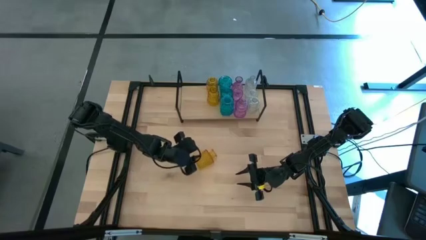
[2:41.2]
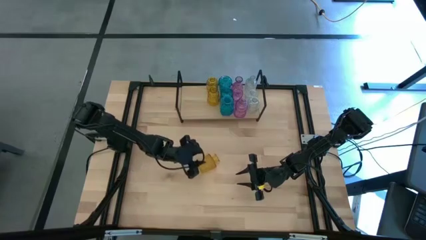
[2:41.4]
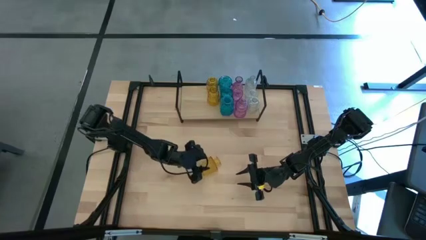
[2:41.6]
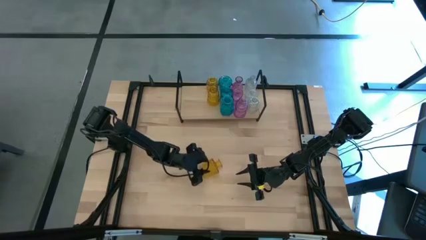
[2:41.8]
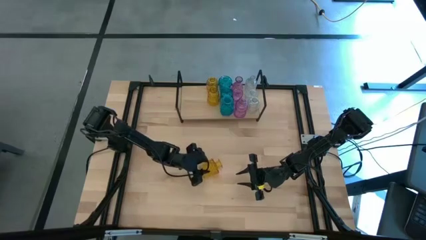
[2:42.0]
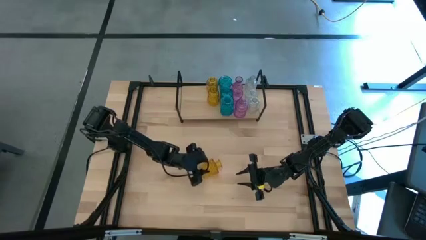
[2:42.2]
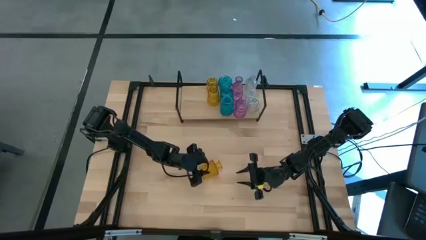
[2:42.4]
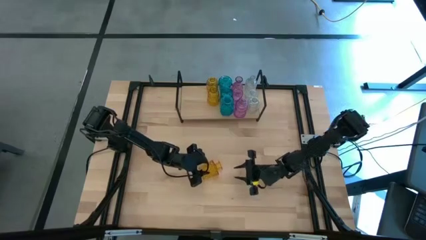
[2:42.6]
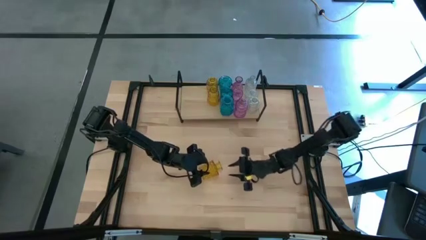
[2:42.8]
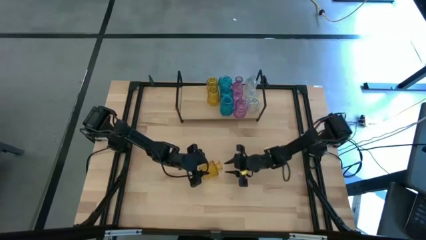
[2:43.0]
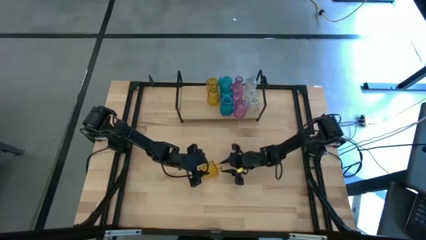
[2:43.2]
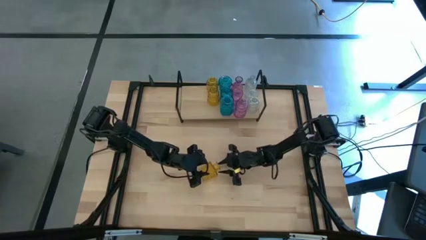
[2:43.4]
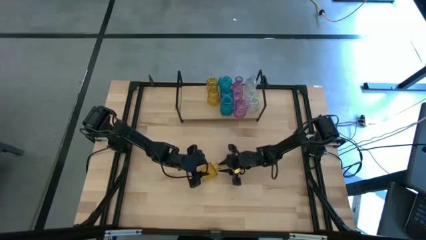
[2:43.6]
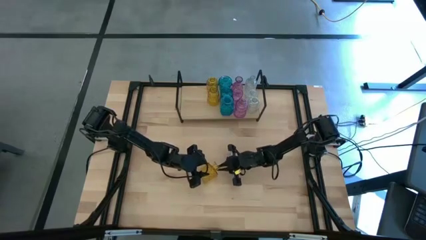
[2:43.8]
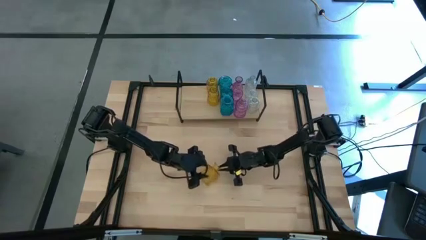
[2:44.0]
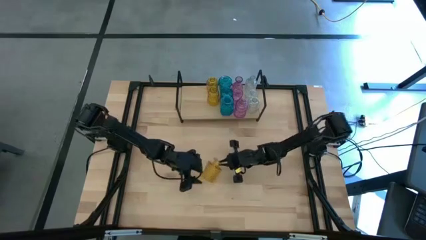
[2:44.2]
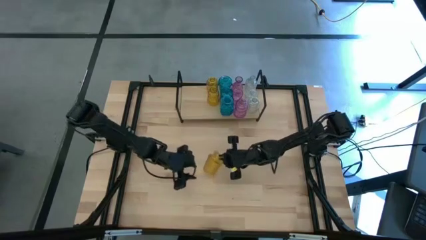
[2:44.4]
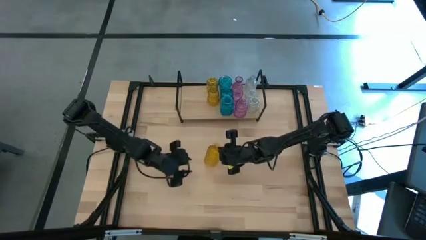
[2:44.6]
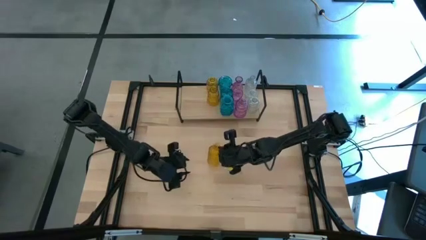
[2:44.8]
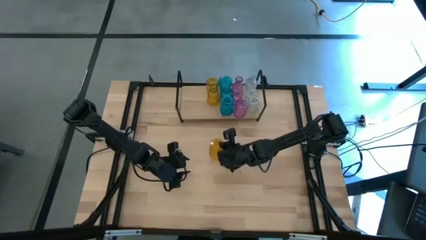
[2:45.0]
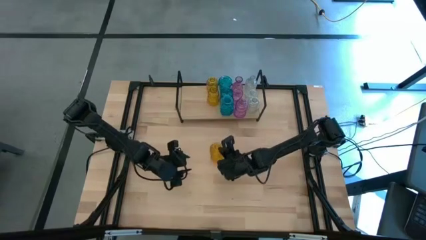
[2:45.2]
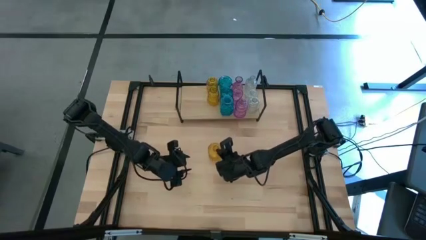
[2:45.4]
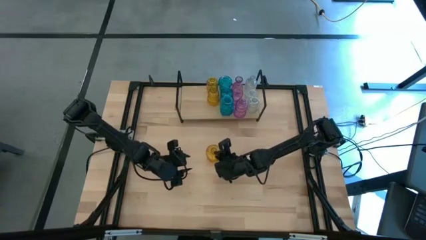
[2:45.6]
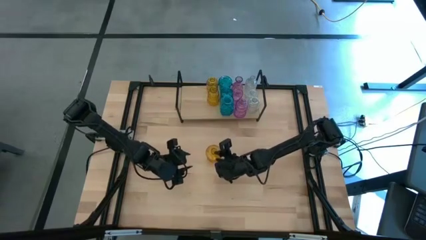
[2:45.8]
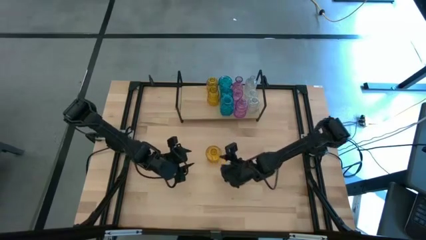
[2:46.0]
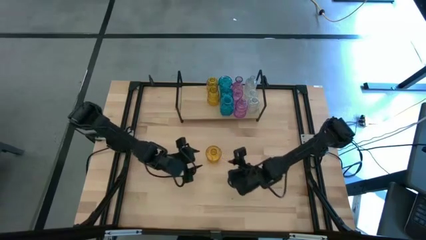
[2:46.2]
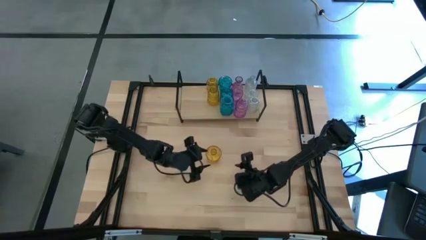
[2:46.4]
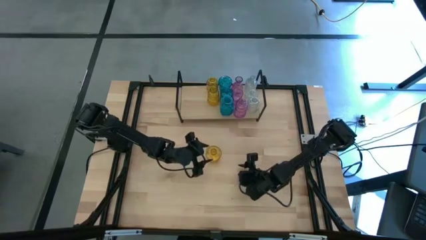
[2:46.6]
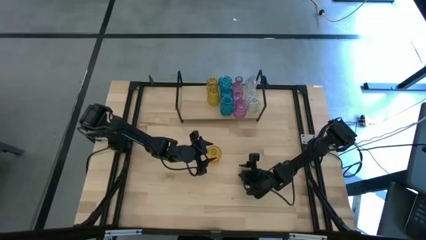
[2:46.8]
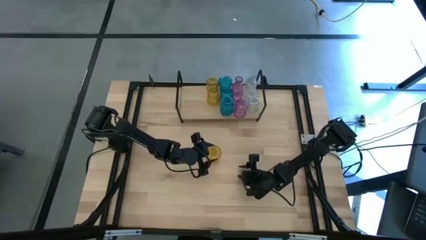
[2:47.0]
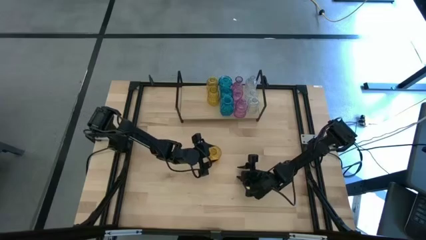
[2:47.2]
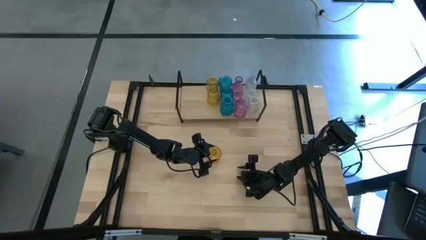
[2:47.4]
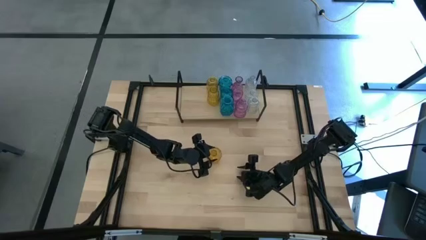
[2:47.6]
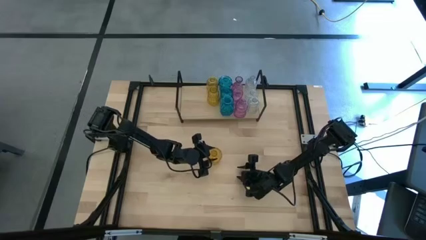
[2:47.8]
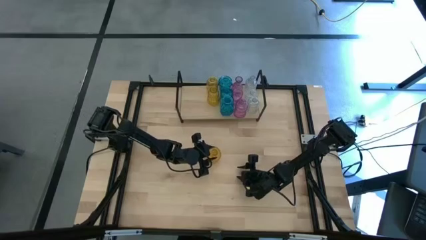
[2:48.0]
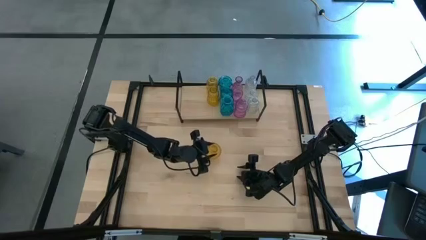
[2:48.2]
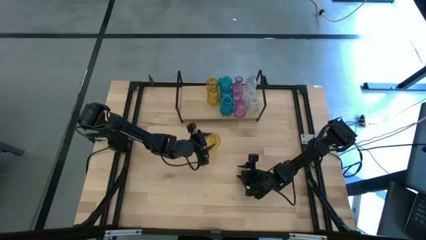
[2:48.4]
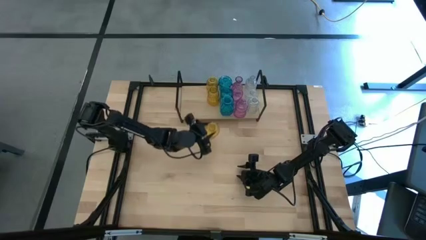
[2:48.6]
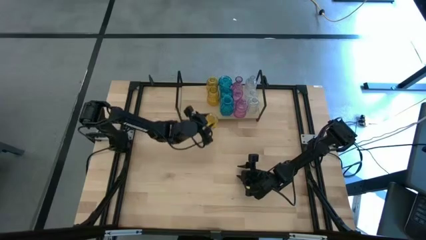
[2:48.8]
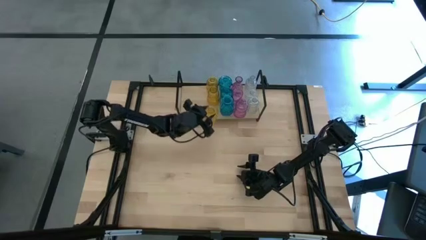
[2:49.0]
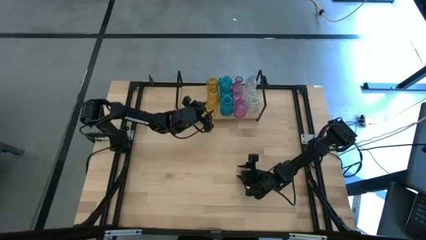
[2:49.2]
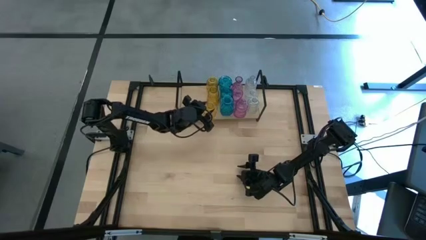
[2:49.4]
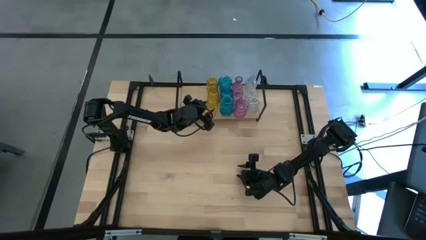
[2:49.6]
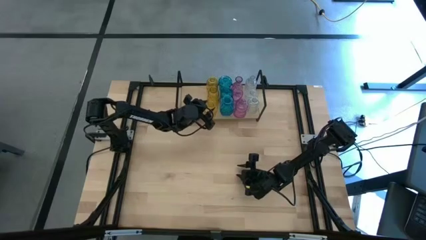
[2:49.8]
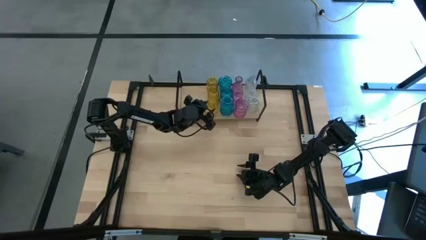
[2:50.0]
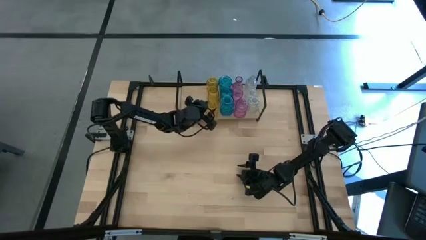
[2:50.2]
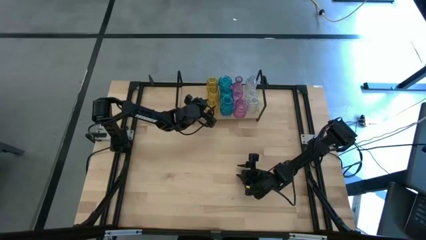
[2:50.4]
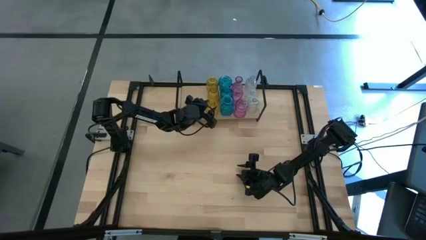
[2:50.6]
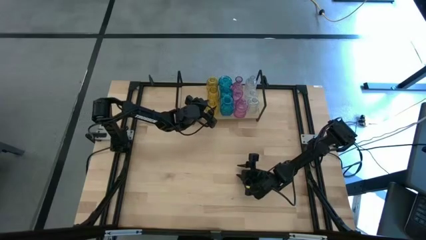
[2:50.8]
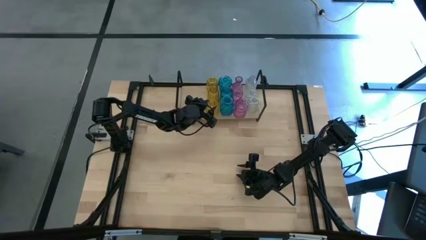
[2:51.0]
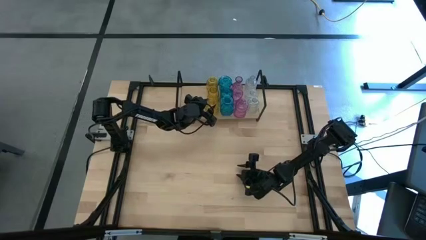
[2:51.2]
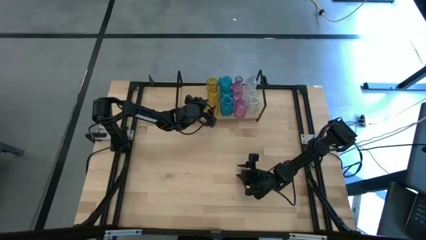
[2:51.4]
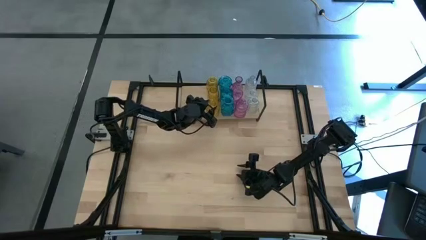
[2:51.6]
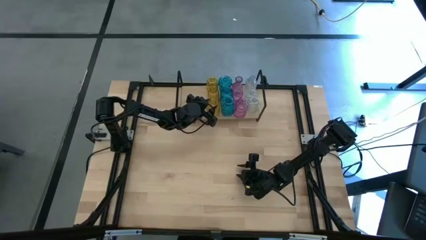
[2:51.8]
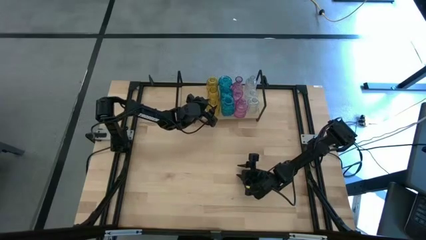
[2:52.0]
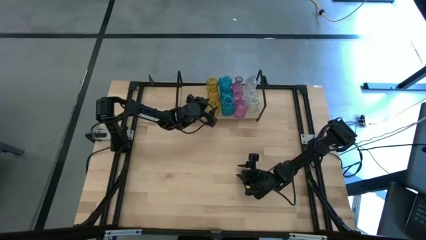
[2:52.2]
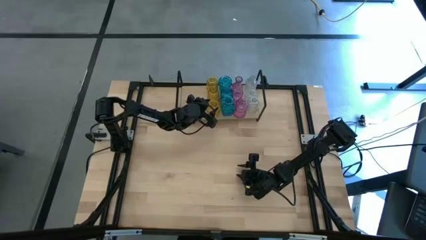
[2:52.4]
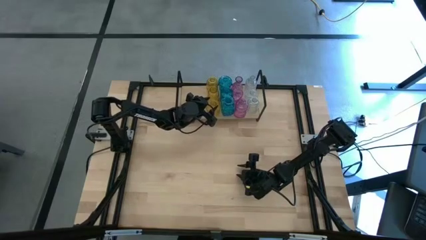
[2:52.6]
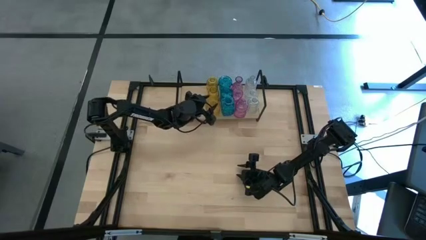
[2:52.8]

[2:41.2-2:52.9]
Task: sort vases onto shelf
Put the yellow vase aligned with the other yellow vase on the shelf

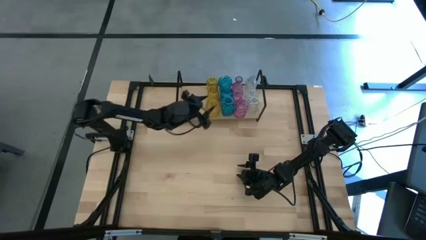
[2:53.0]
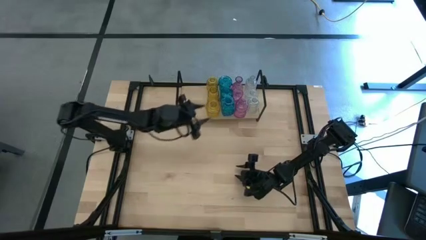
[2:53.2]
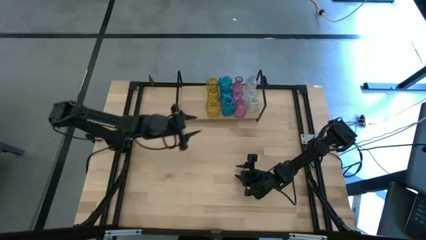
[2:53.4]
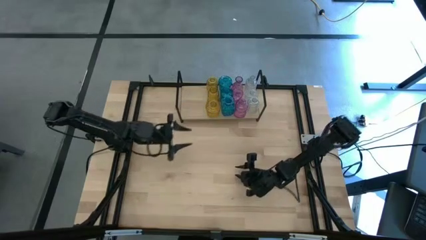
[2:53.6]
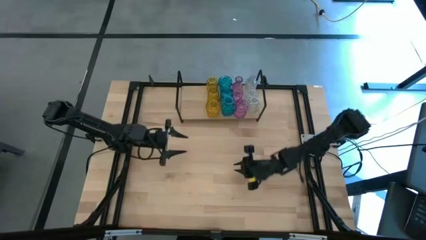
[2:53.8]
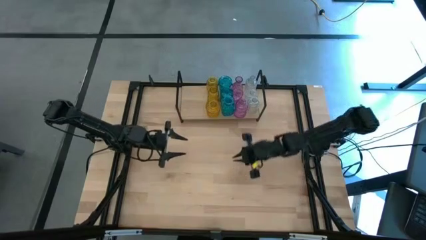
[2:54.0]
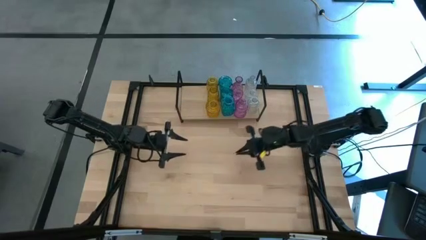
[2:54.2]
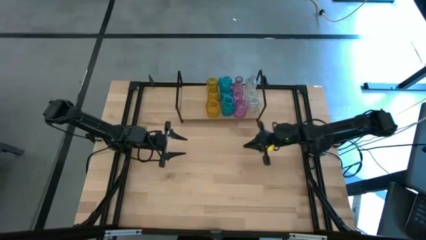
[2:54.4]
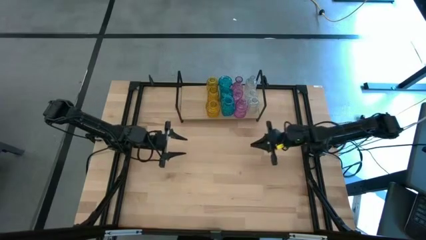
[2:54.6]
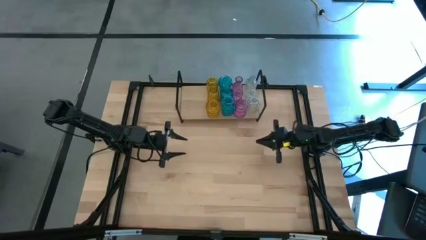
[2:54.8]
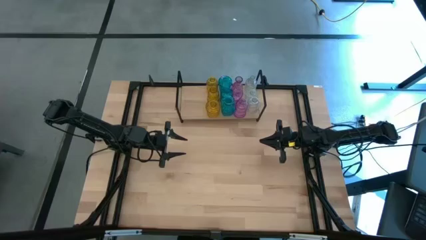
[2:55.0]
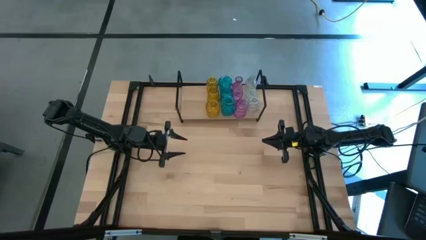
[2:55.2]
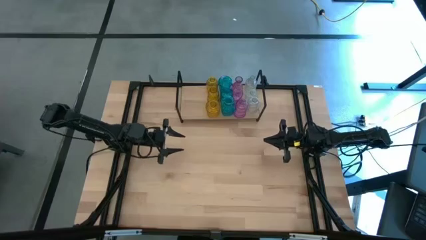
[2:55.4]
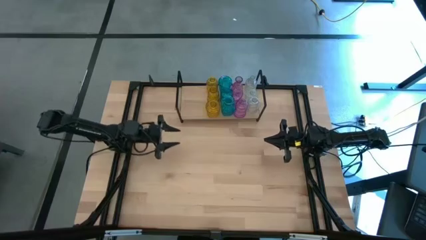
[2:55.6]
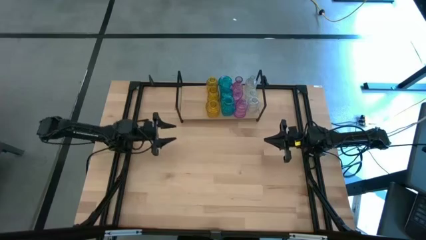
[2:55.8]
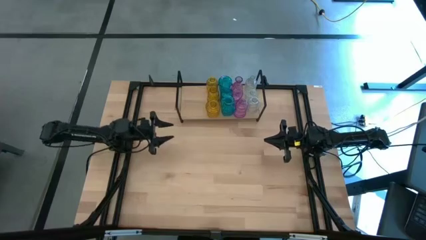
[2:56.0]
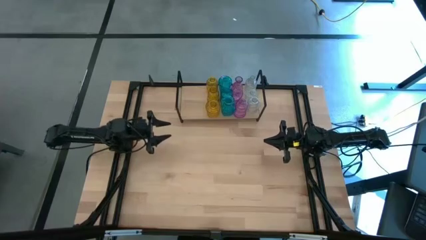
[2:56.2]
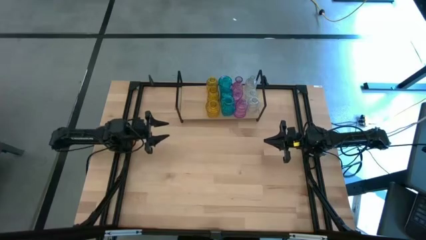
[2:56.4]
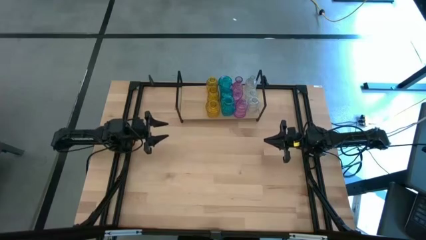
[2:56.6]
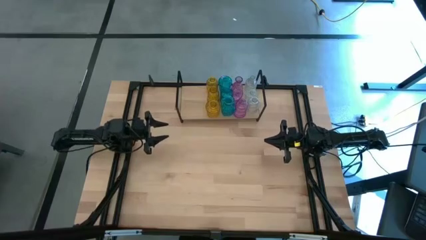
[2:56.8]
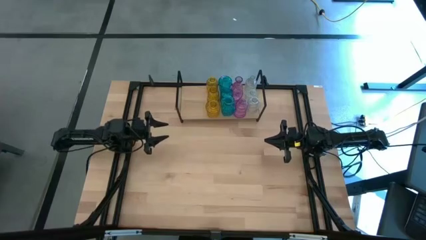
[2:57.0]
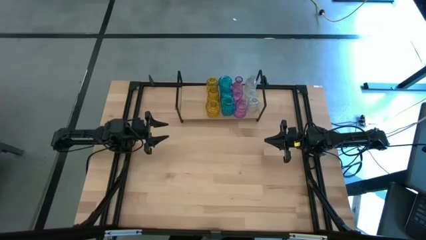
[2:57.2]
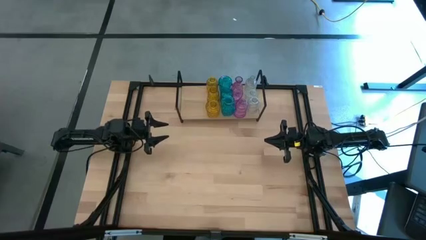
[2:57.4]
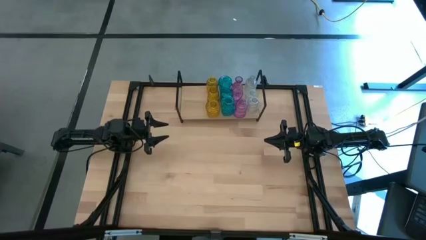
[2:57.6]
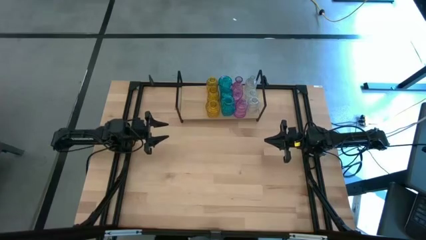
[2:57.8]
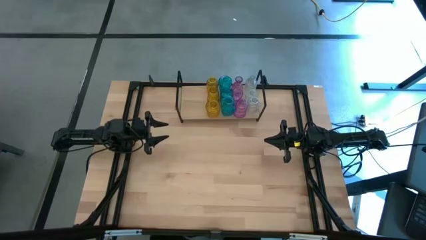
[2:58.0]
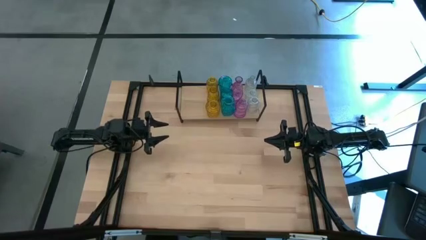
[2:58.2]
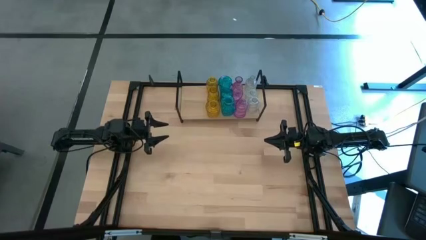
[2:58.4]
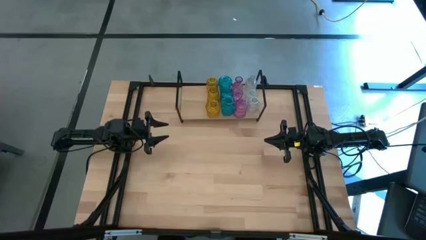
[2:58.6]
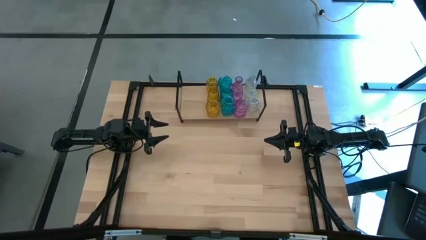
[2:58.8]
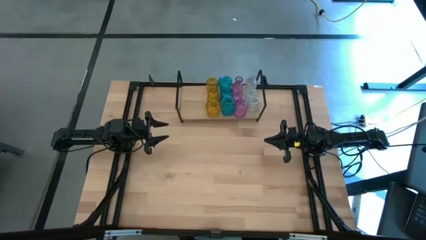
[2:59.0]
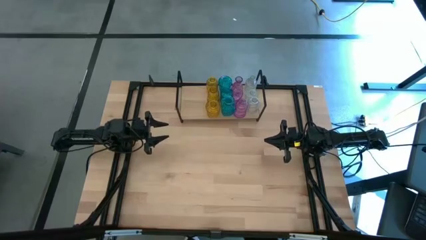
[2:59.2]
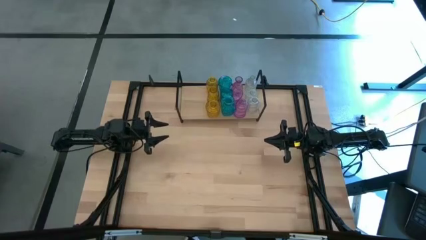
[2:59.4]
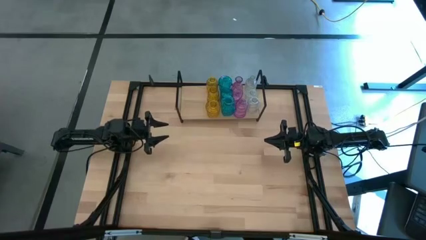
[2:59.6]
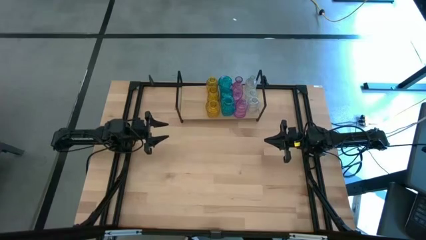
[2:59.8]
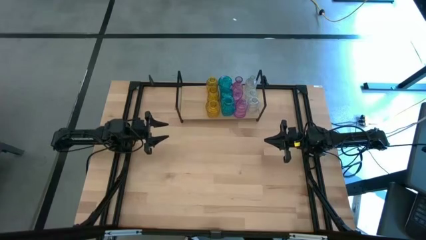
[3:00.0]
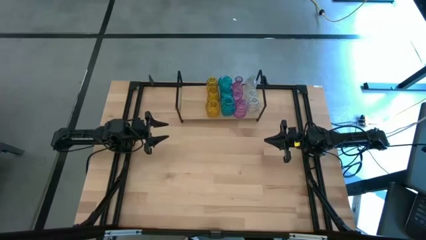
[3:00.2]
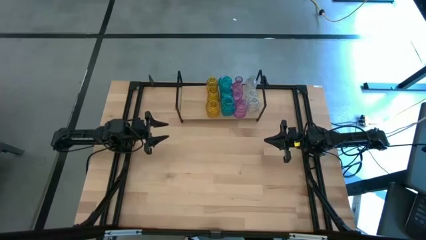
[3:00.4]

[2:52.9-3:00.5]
Return to Home Position
